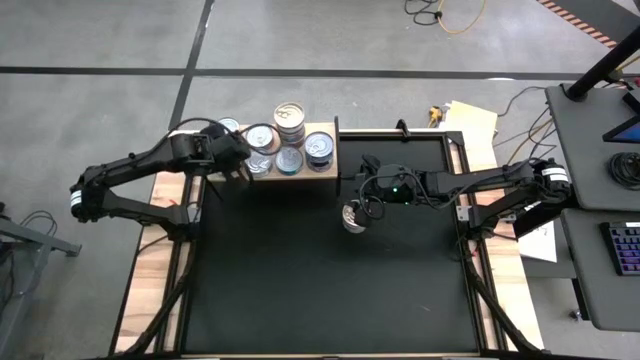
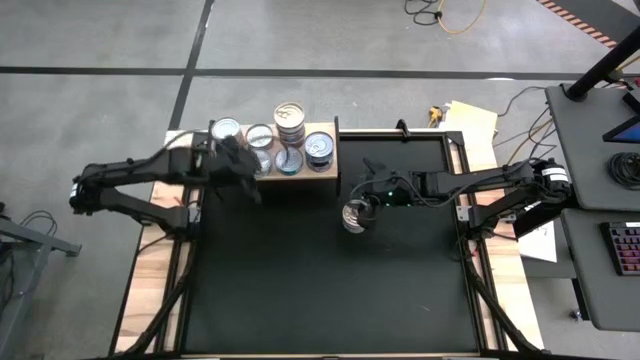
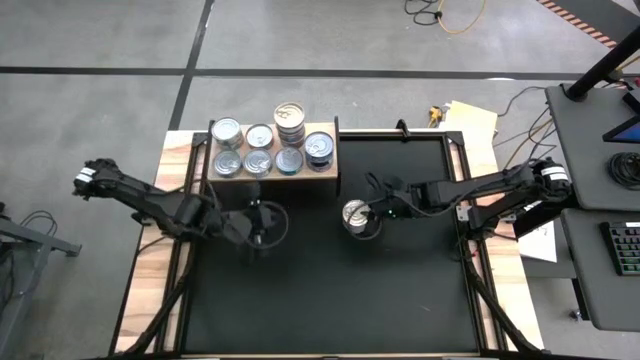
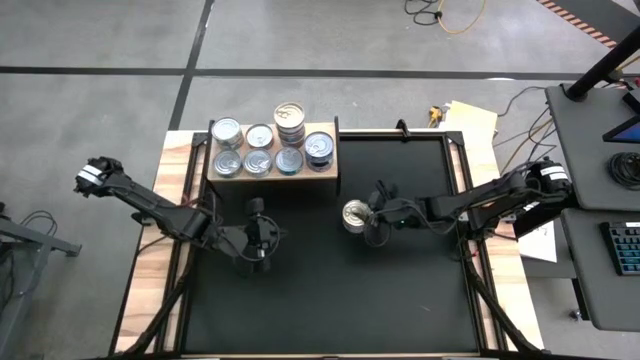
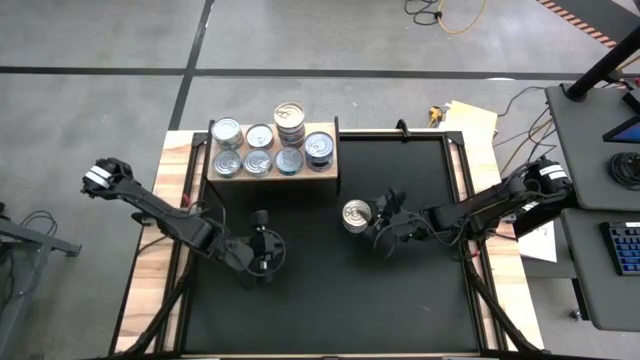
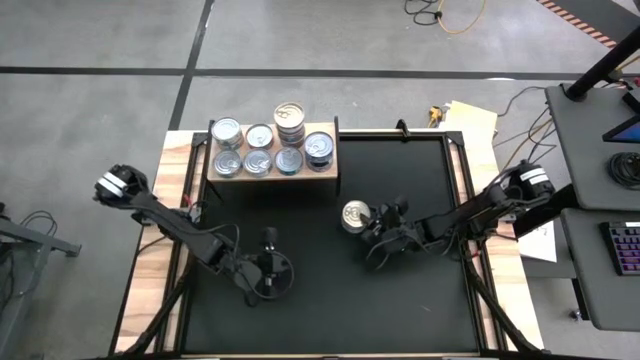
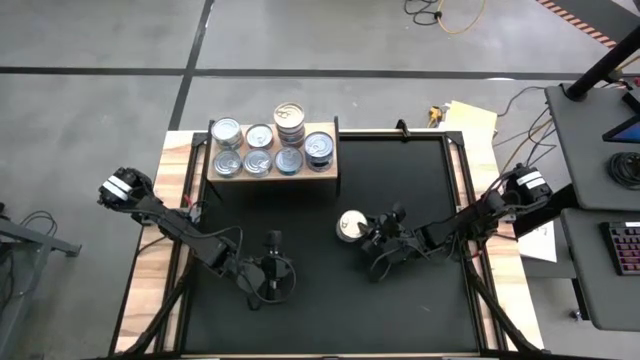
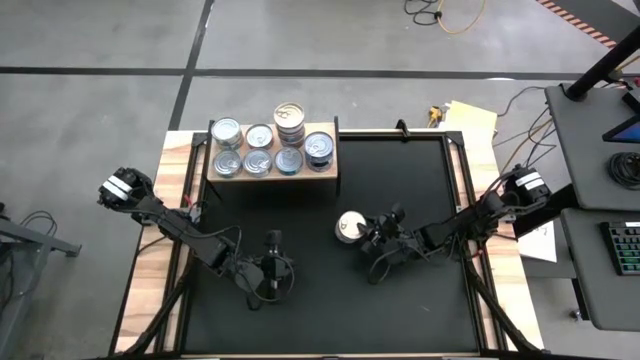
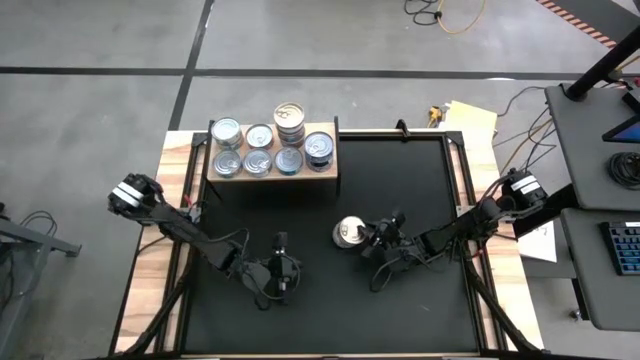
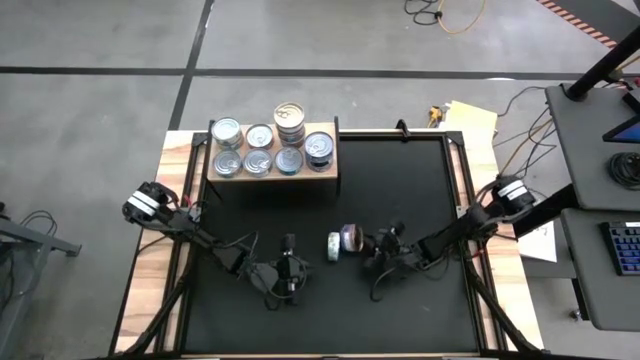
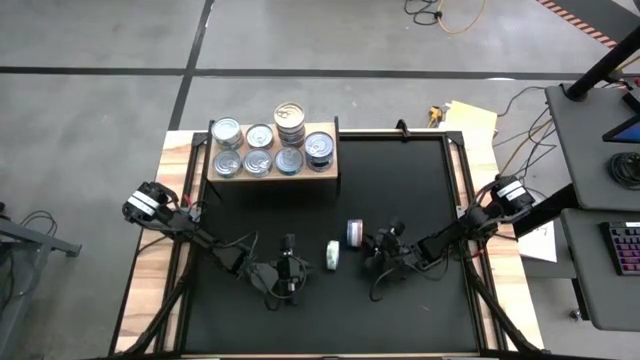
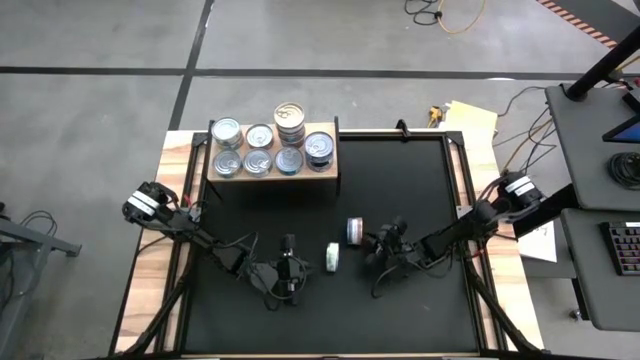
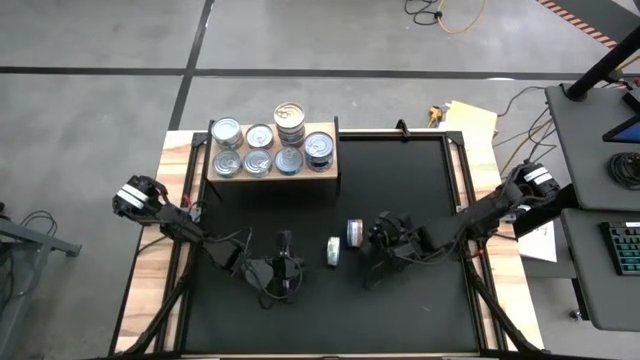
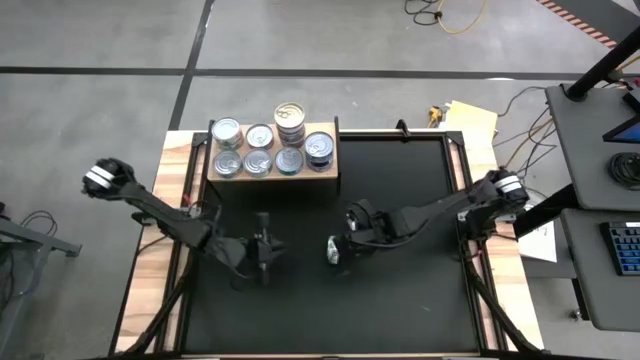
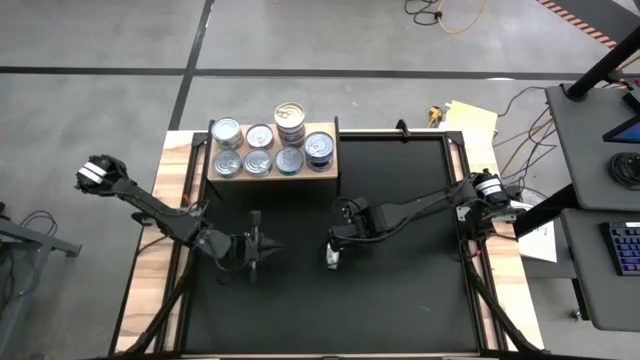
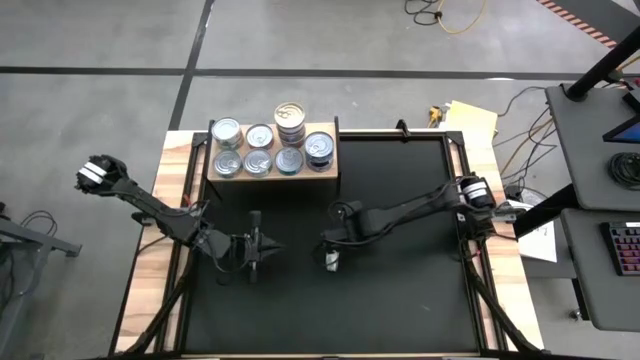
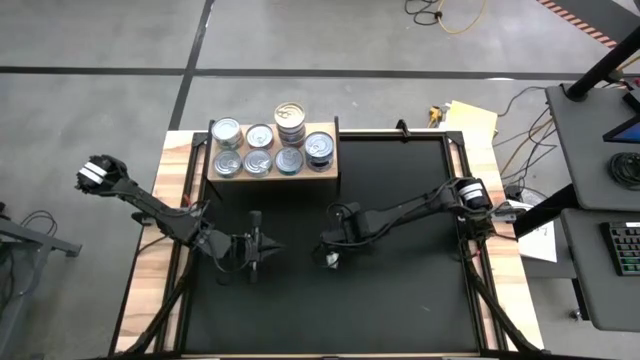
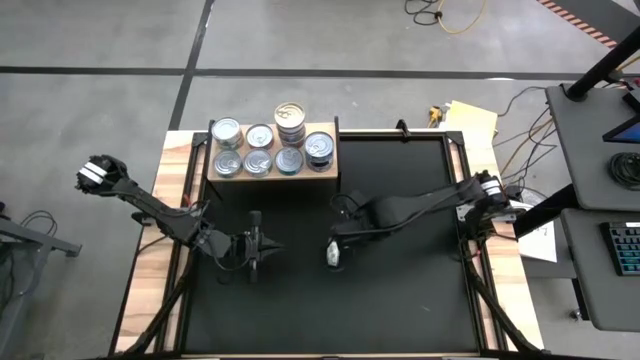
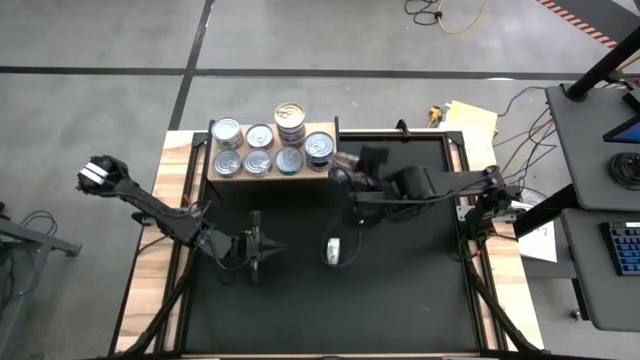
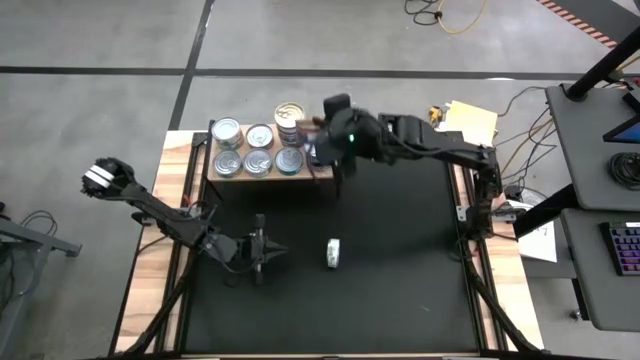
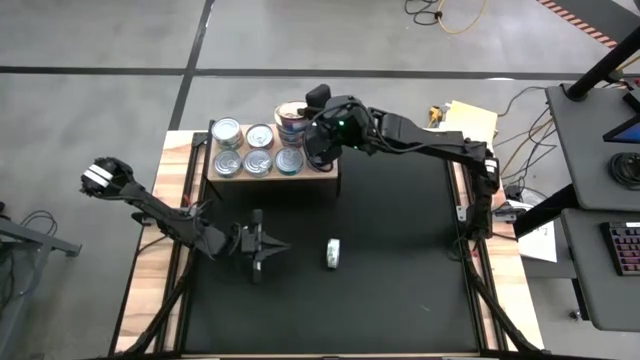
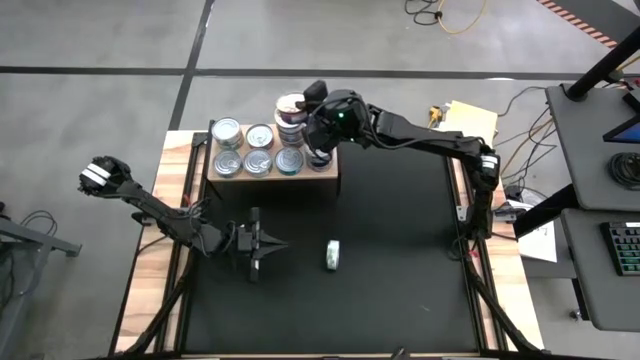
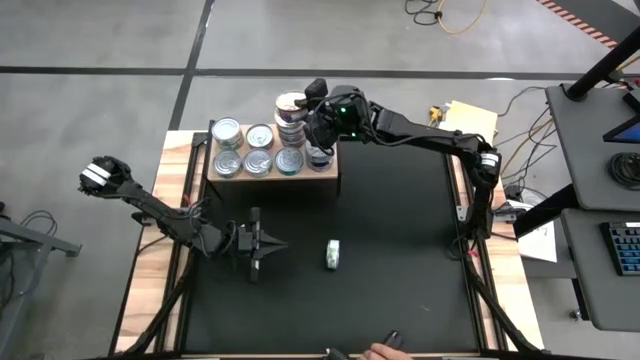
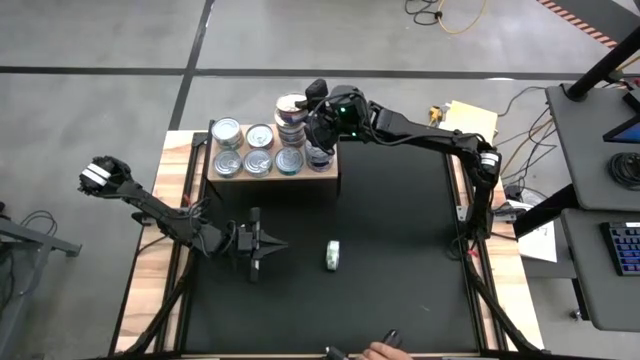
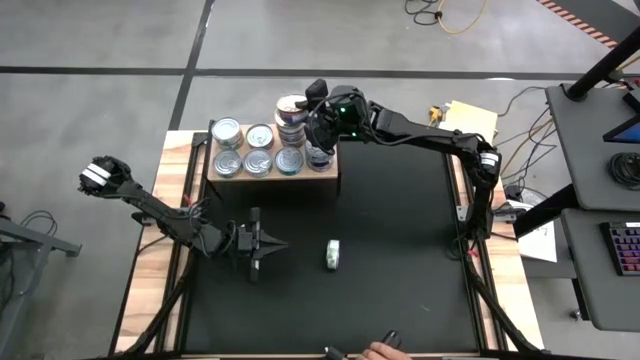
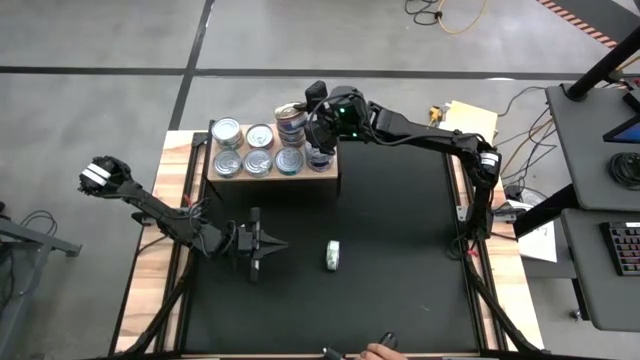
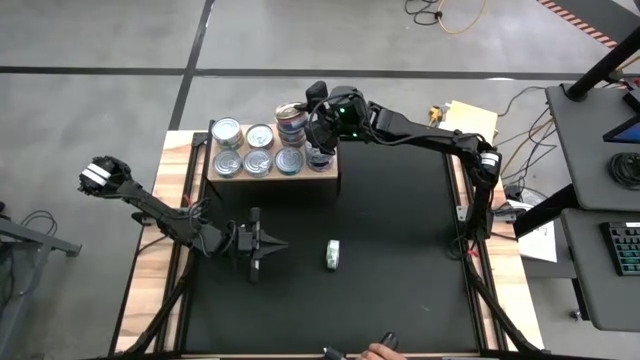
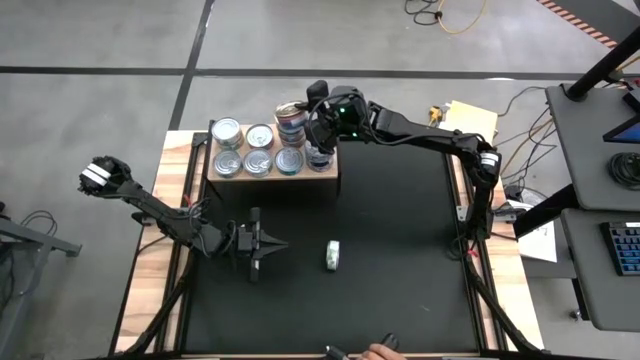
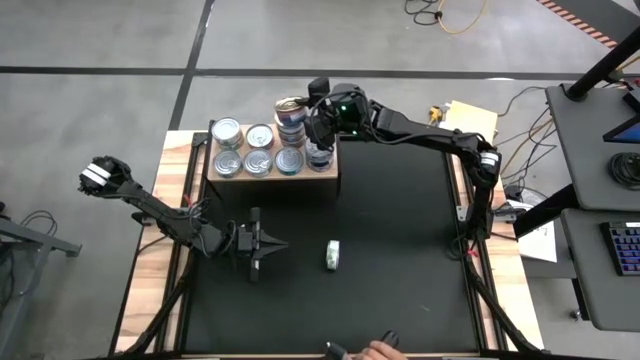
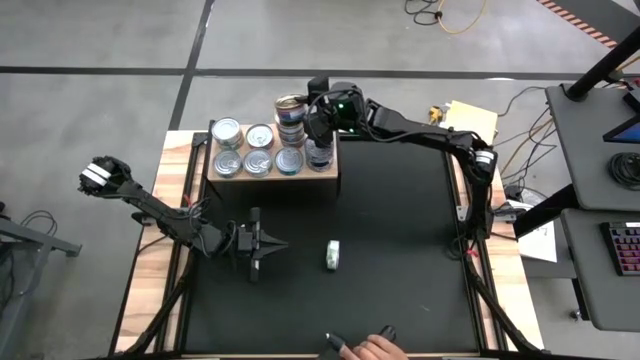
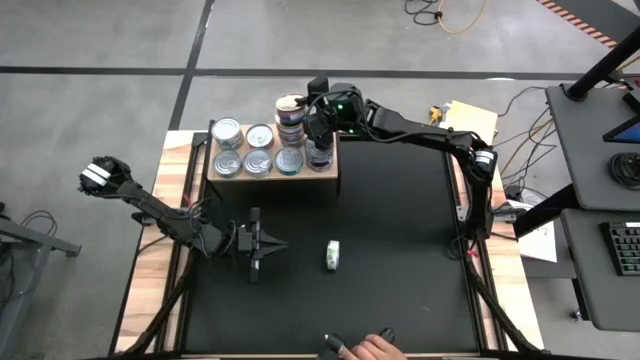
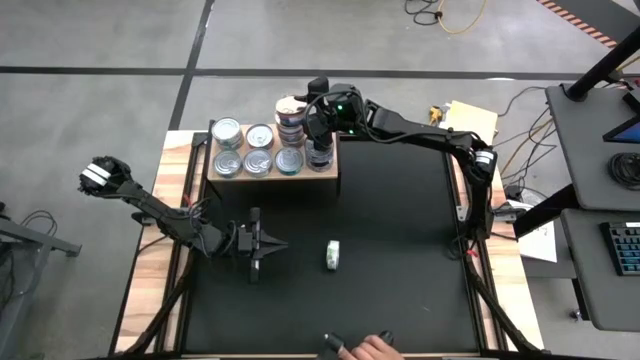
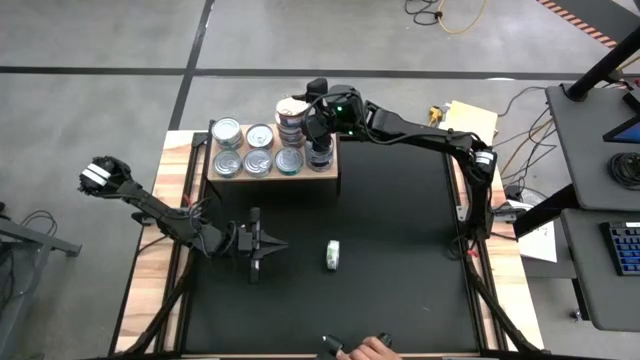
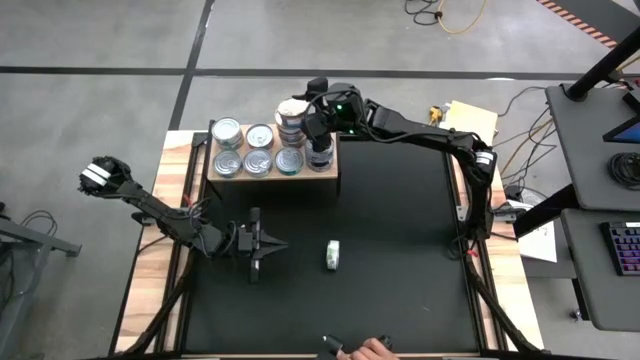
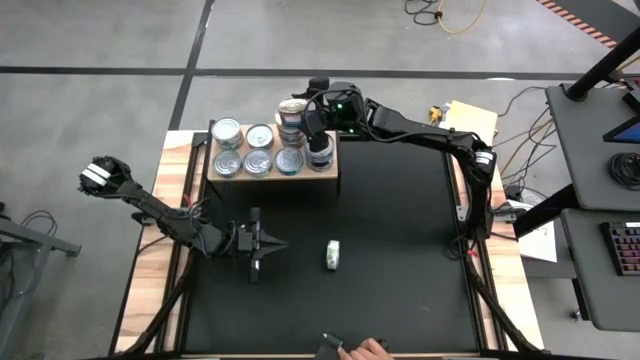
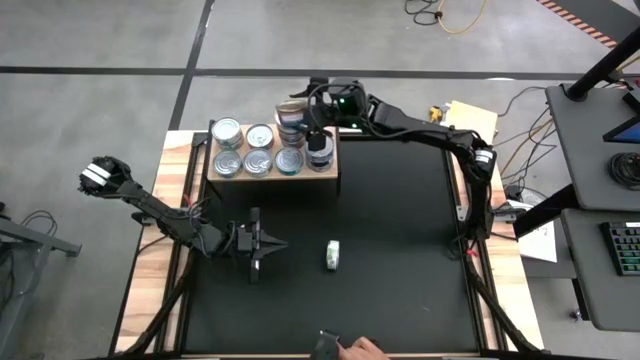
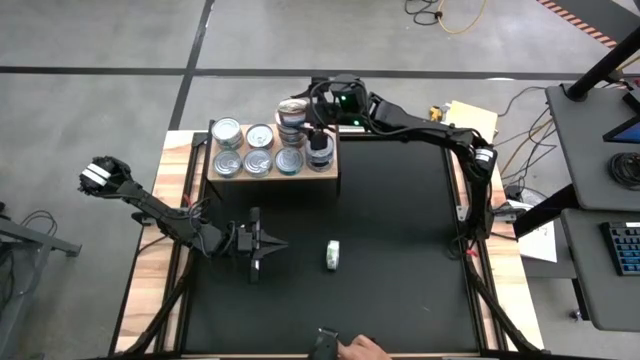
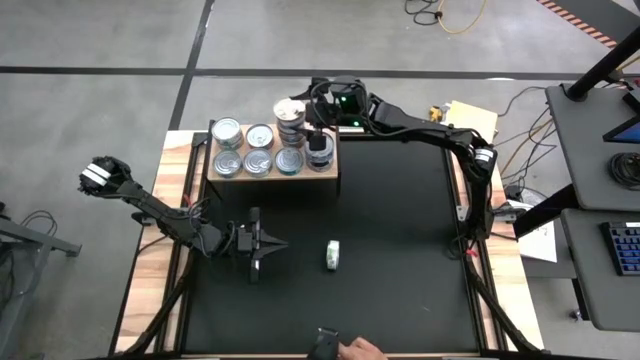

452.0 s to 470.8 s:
Task: Stack canned seafood by type on shelf
Stack the blue and pink tuna can on top of the other blue and pink tuna can on the shelf

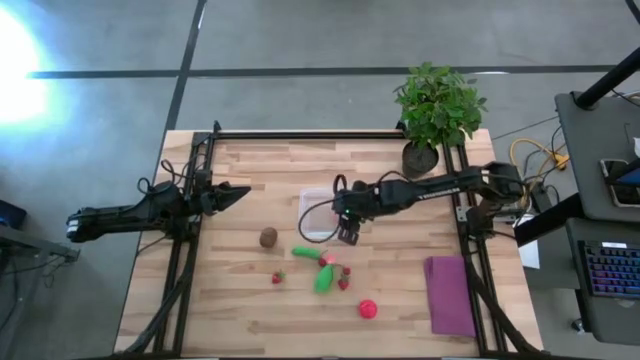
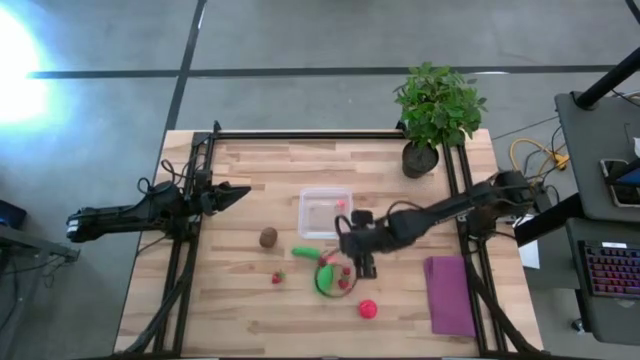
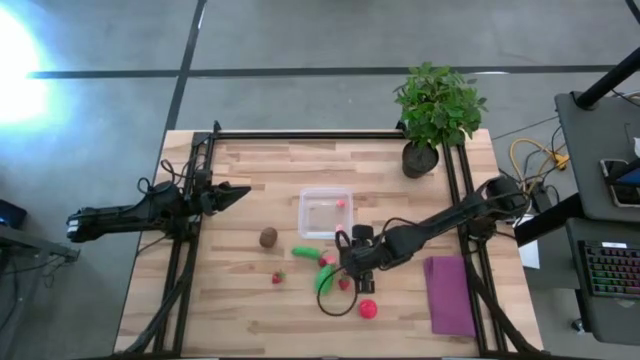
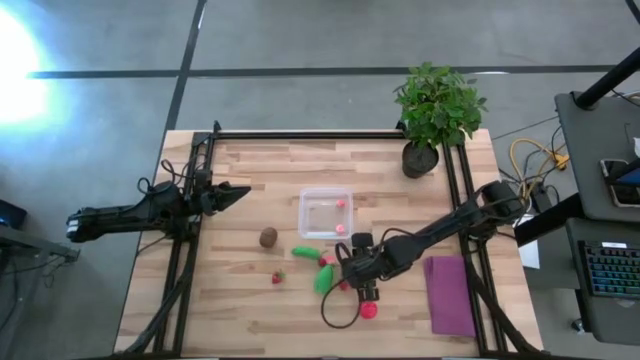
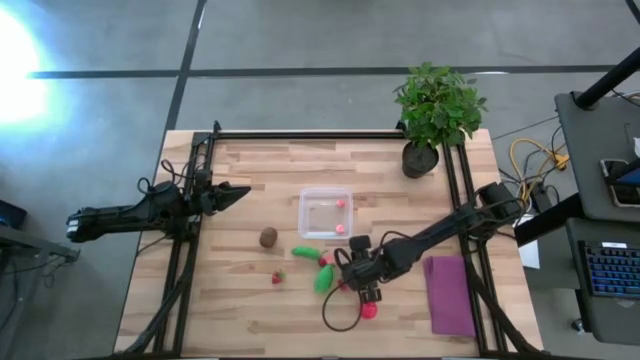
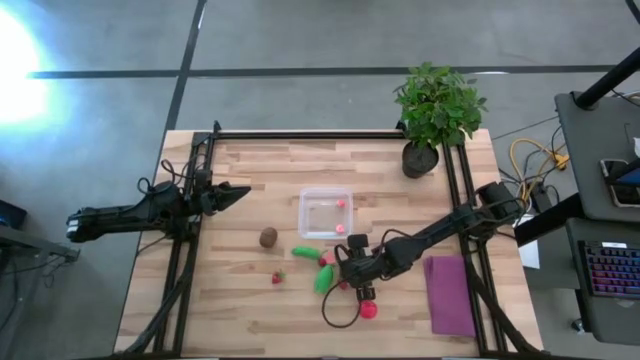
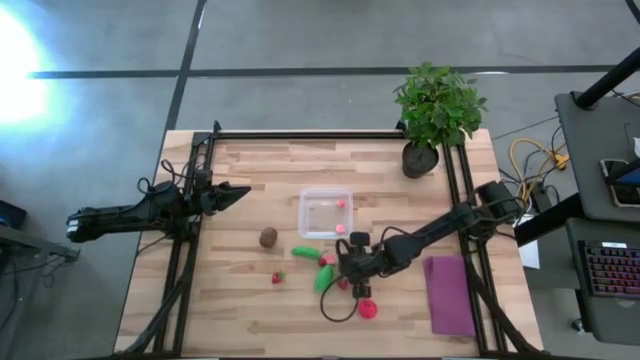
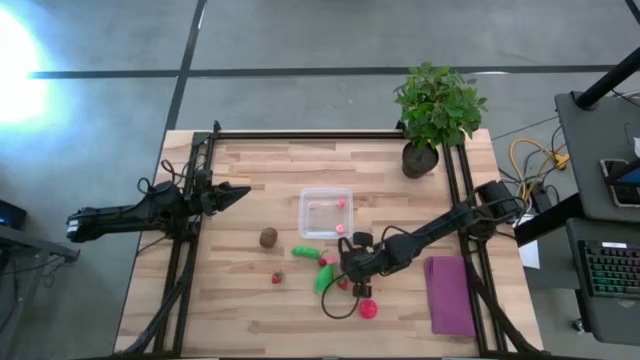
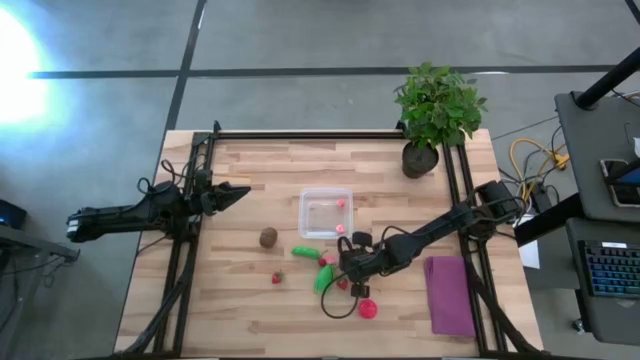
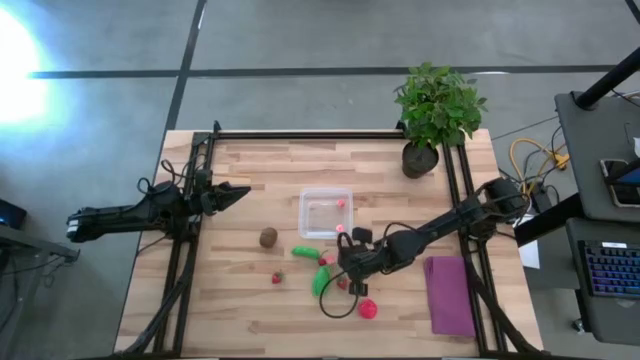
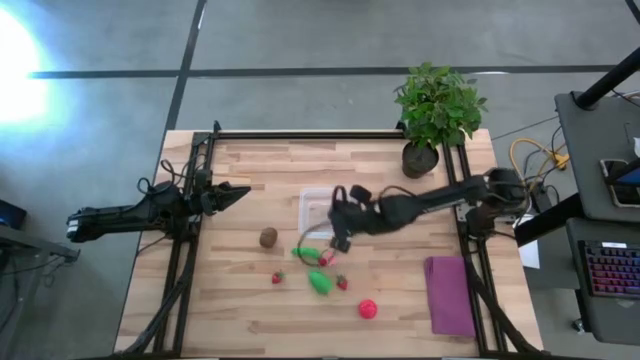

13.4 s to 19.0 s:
Task: Pick and placing Produce into tupperware
Put the right red cherry into the transparent bin
